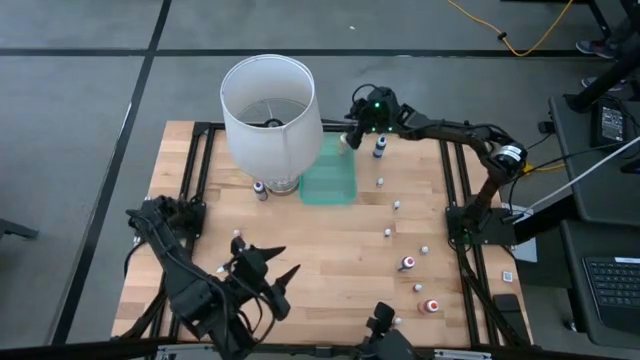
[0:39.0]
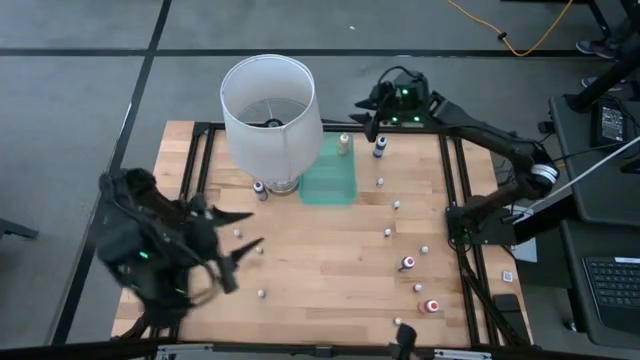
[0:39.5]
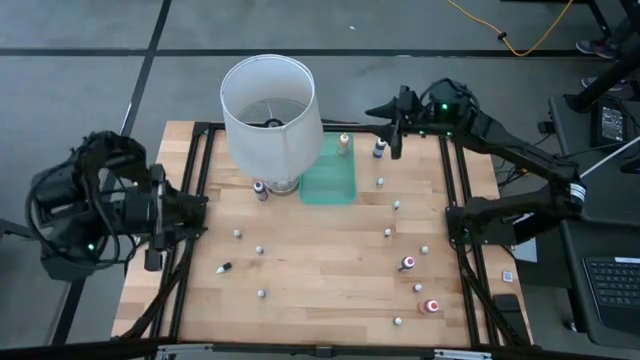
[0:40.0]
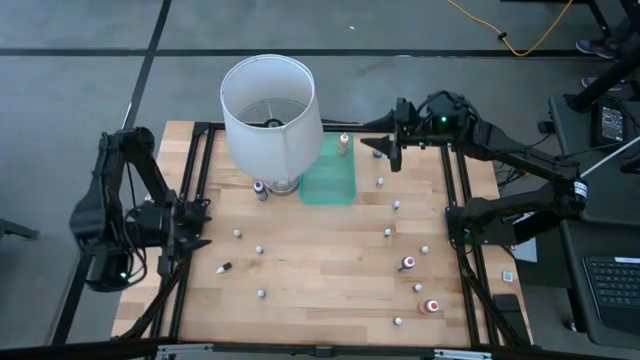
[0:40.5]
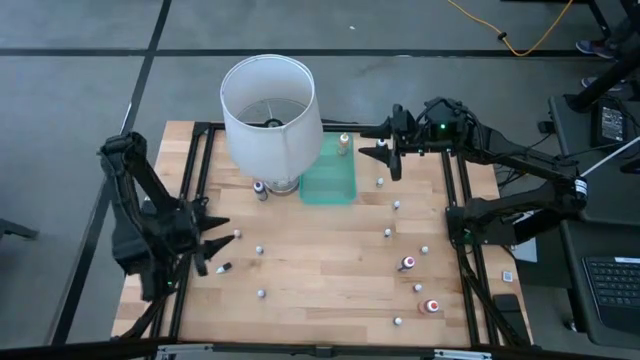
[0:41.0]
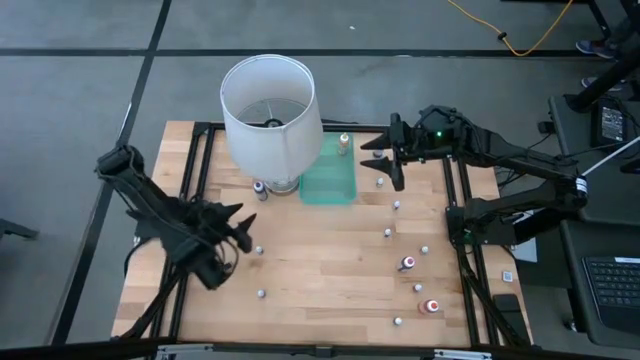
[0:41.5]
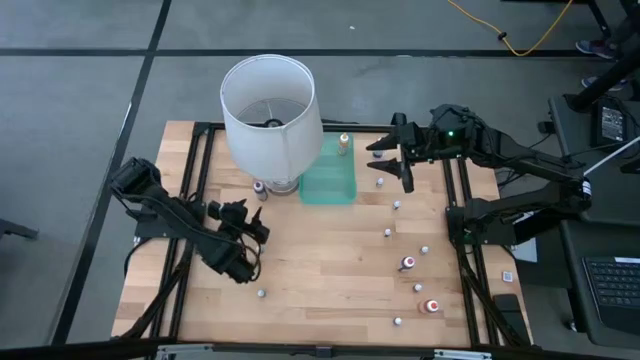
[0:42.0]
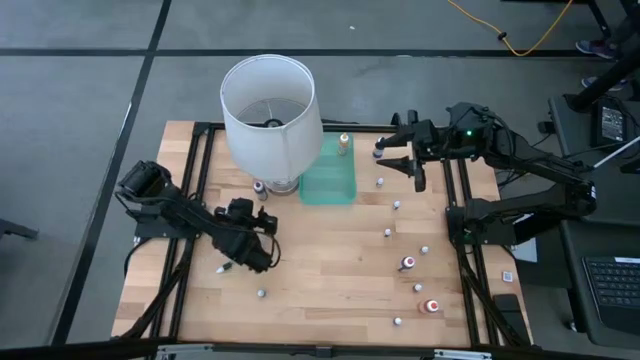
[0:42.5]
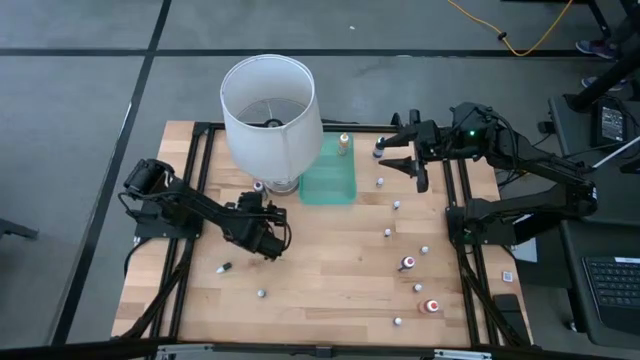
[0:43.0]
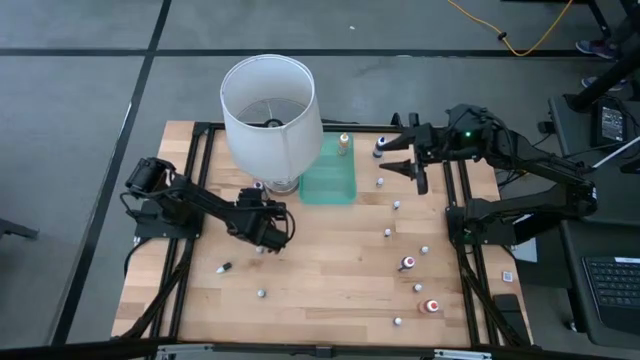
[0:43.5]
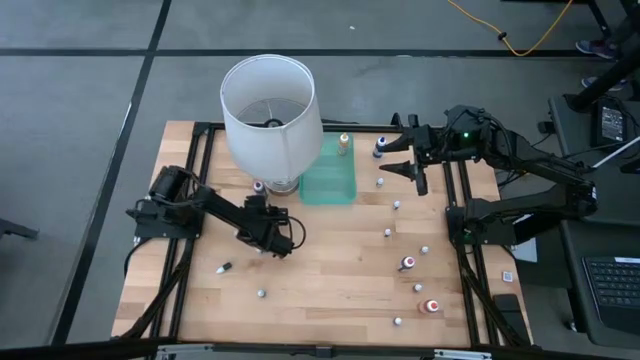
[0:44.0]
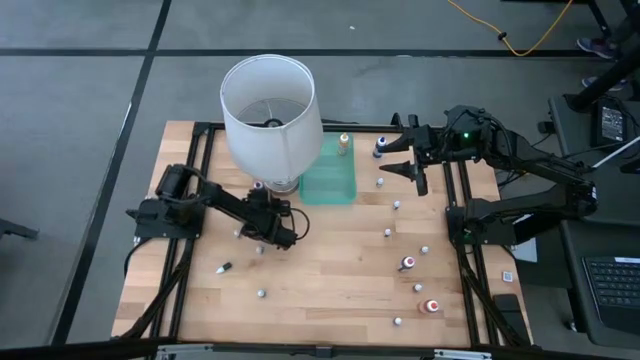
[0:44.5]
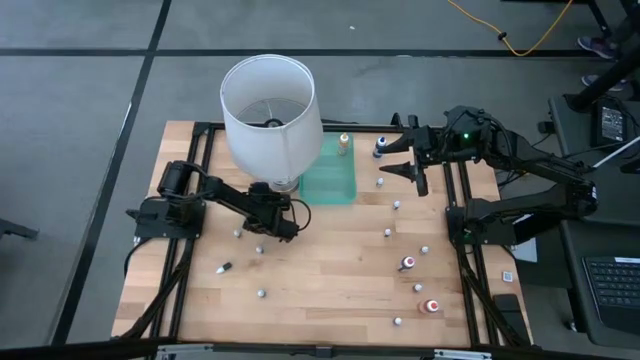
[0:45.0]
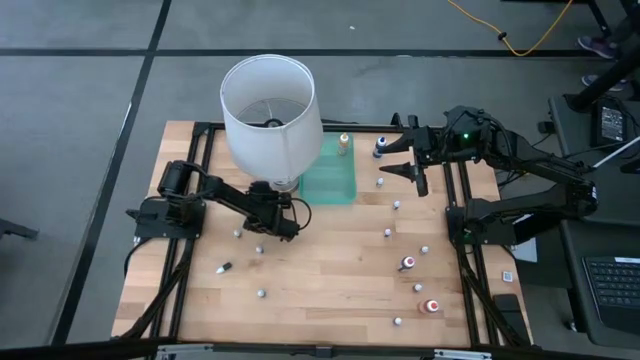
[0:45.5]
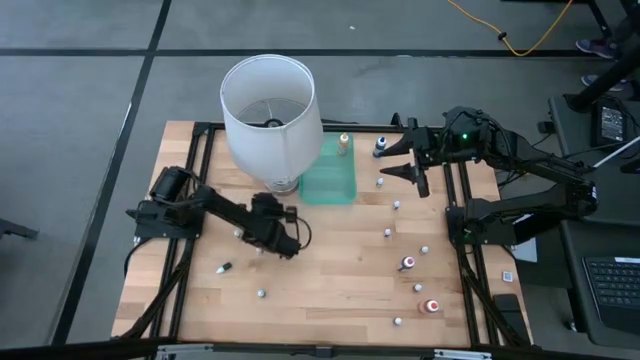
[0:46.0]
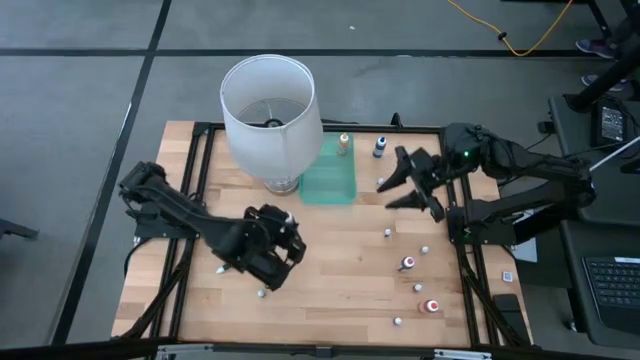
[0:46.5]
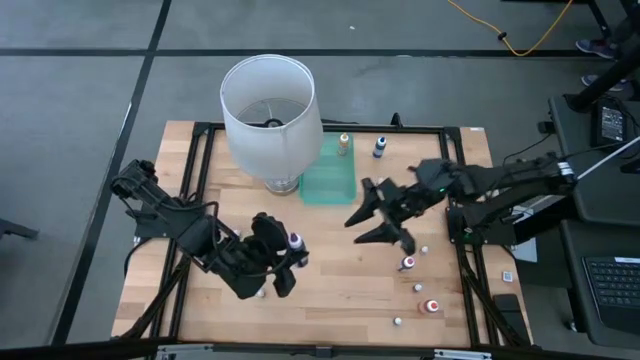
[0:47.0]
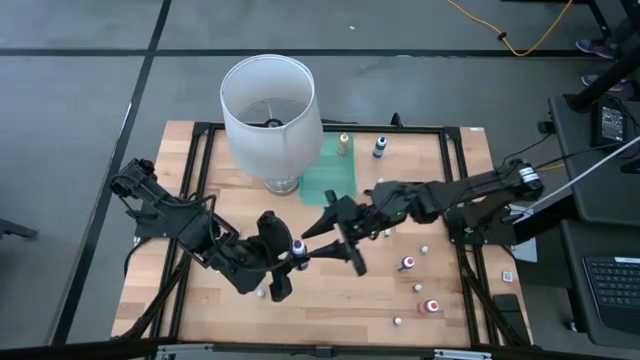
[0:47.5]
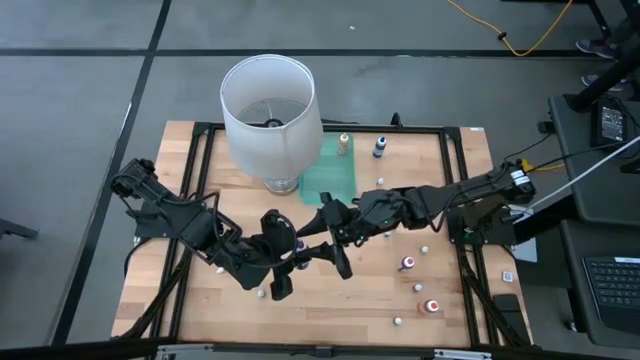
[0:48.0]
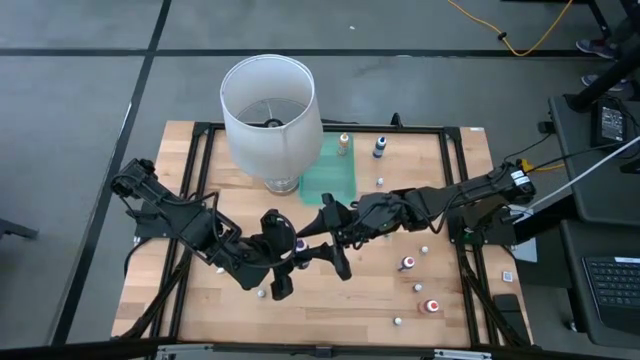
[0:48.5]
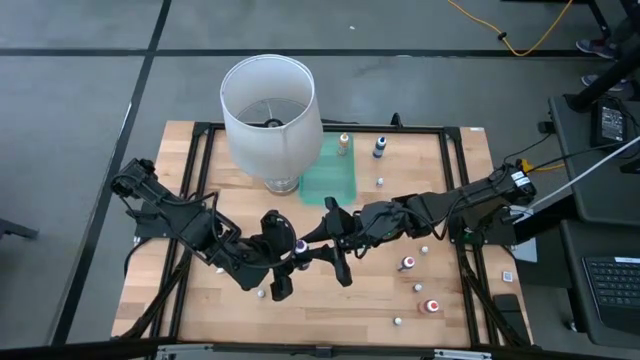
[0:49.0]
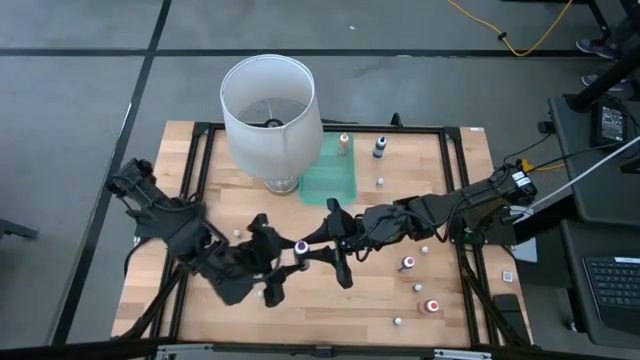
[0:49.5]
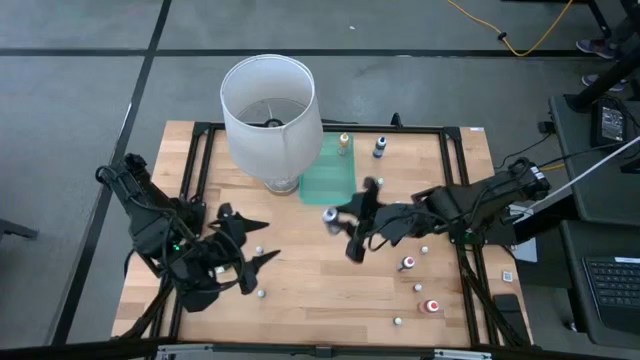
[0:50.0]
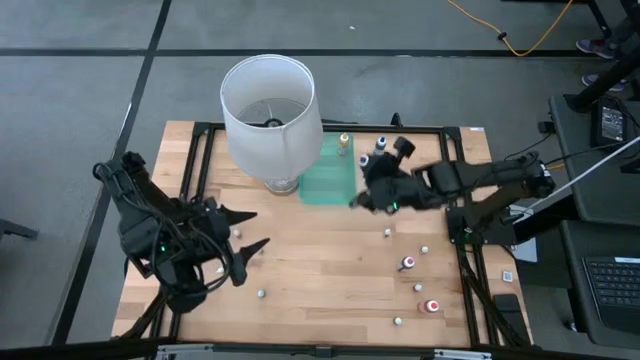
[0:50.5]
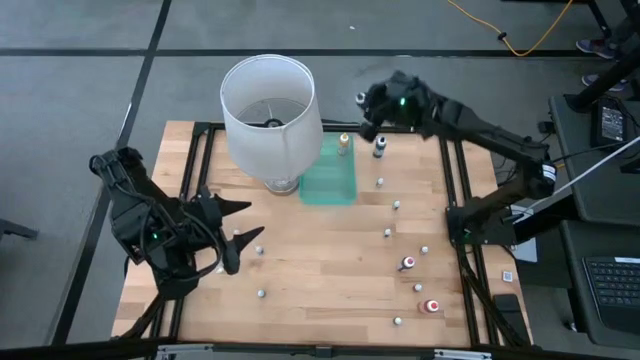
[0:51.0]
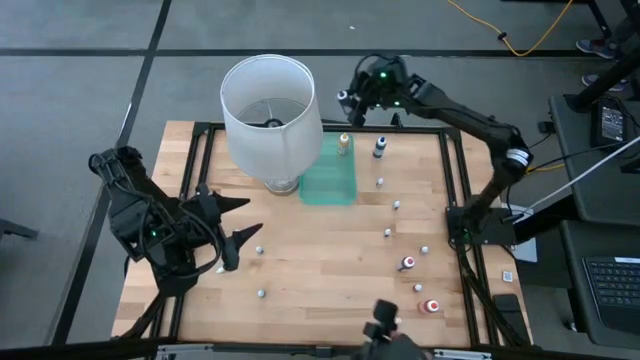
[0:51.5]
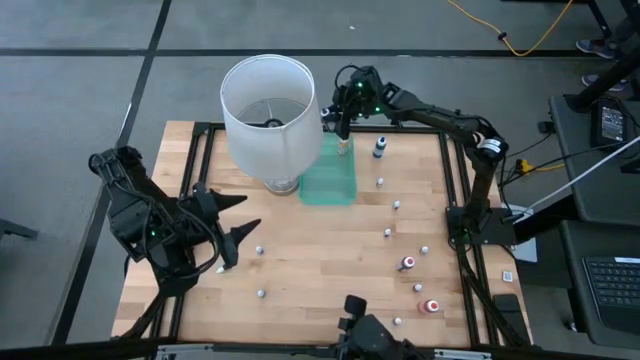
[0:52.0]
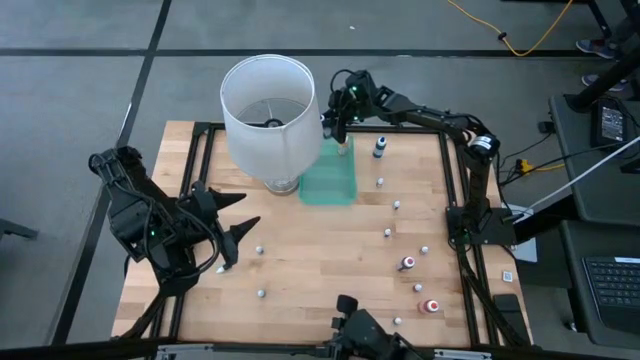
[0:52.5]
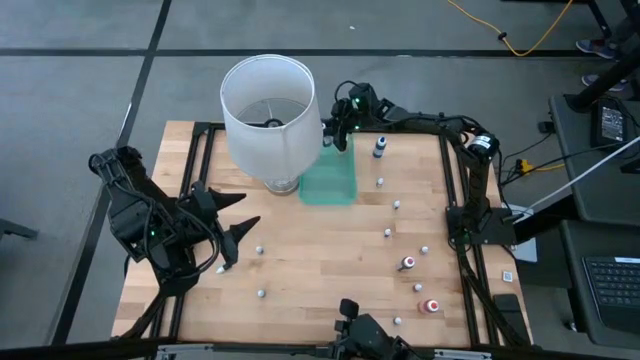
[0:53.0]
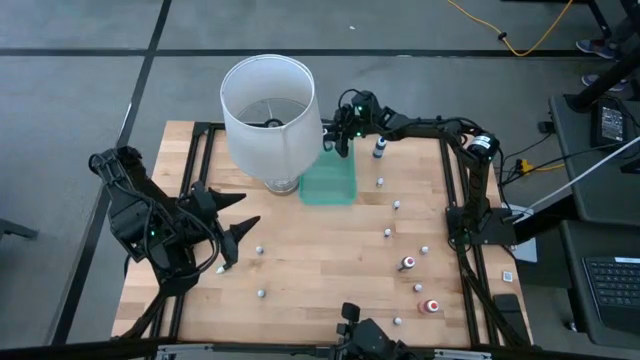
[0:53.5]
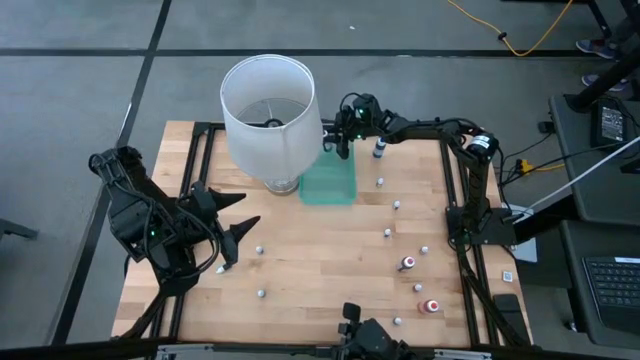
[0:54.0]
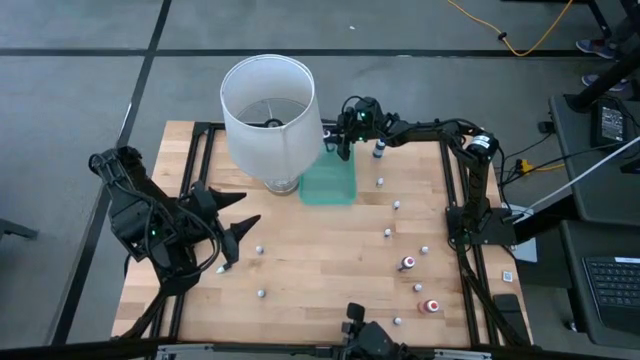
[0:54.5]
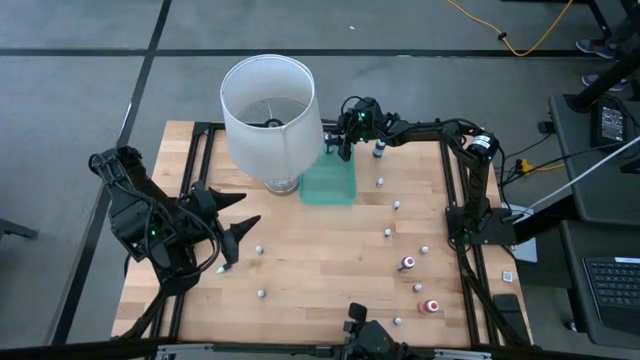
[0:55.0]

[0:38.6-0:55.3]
Task: Pick & Place food coloring
Put the large violet food coloring bottle into the green bin

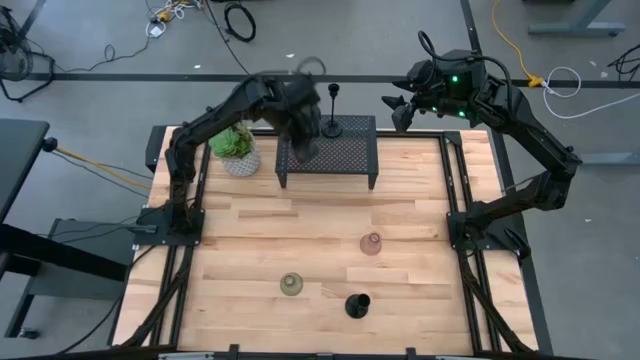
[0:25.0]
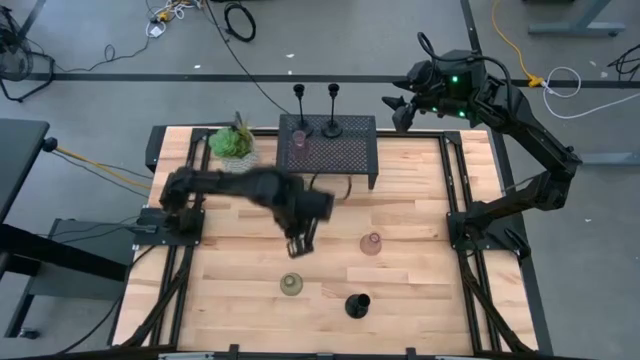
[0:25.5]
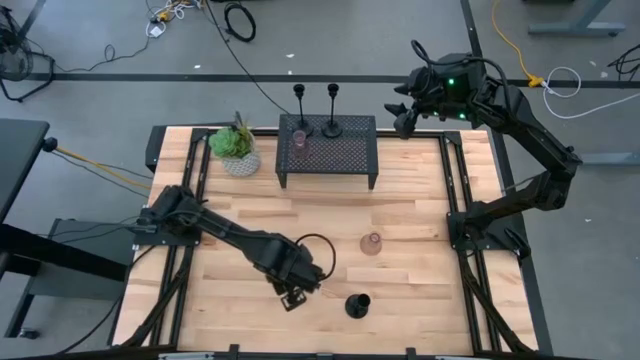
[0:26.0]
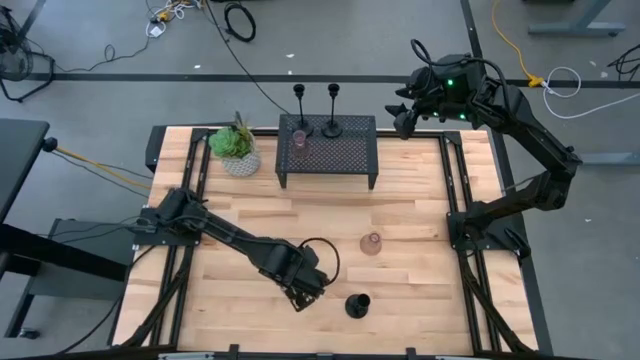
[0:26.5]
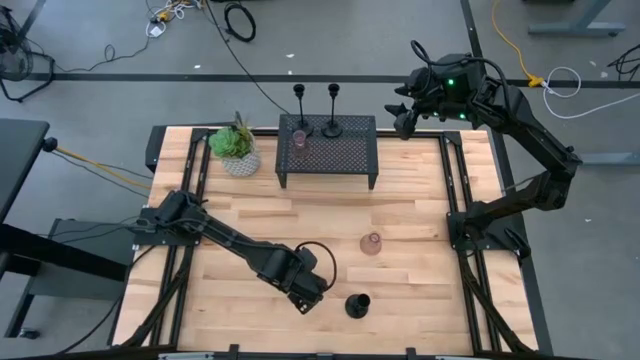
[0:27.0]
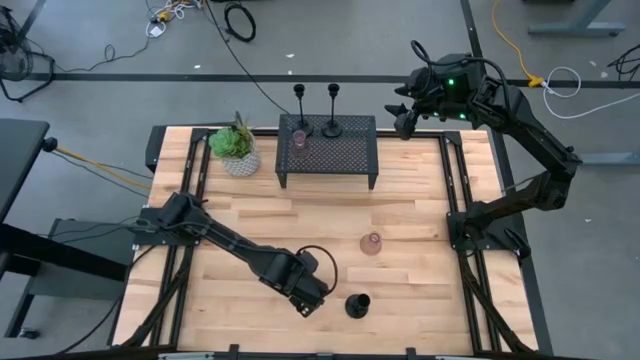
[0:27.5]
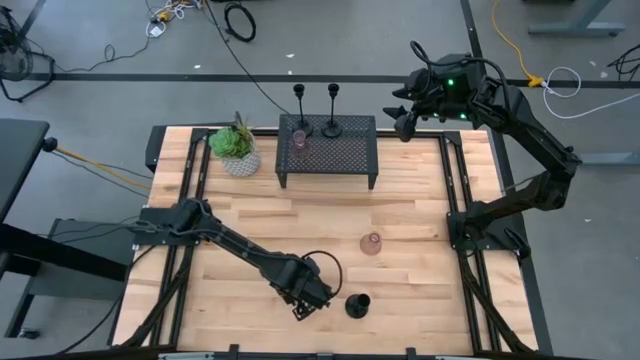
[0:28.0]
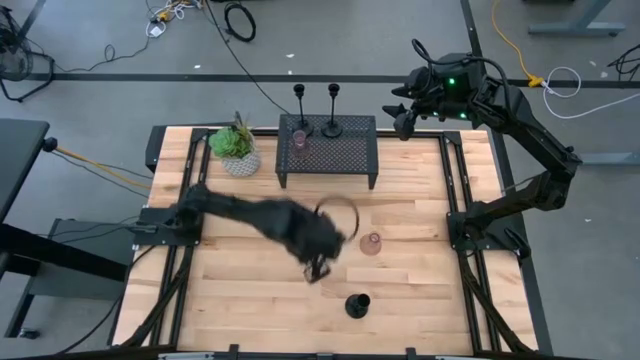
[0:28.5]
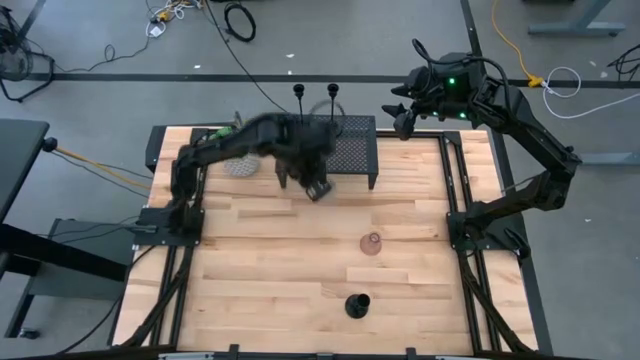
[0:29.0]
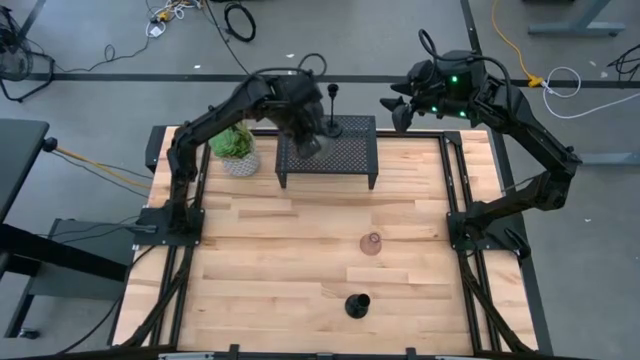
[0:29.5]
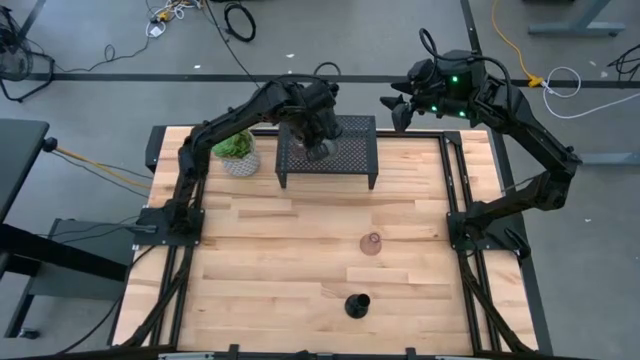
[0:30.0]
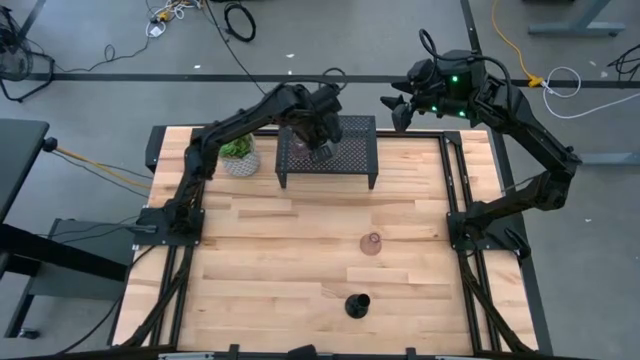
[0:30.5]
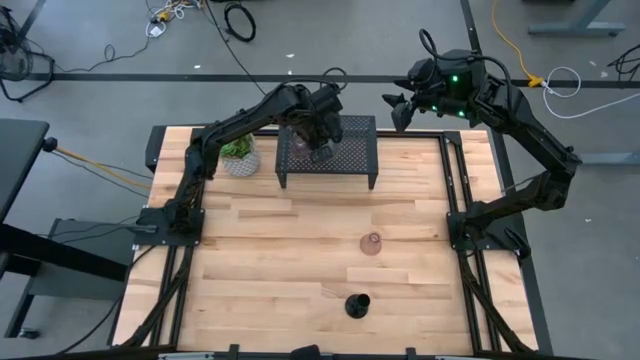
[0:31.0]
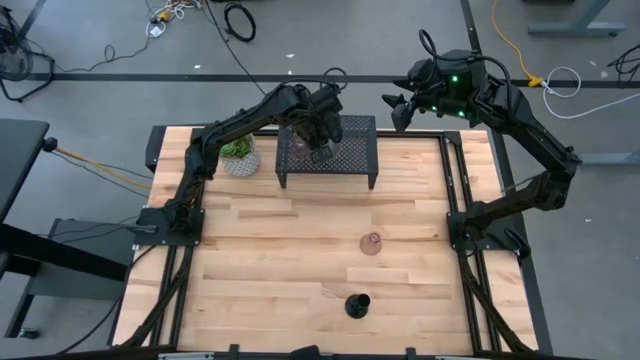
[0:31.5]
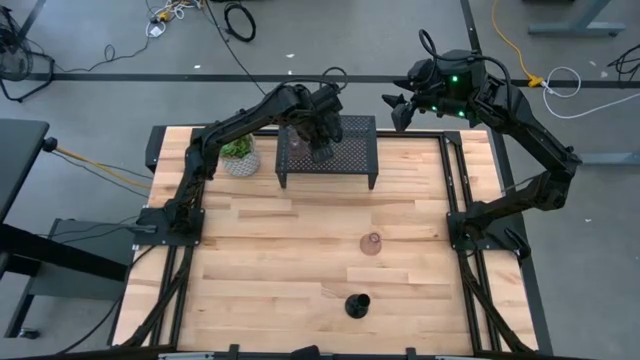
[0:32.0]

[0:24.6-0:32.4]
Task: Pick & Place candle stick holders
Put the green glass candle holder on the shelf aligned with the other glass candle holder
